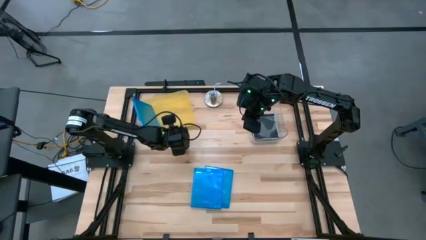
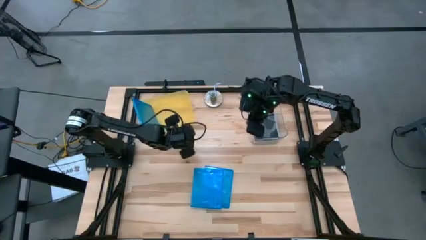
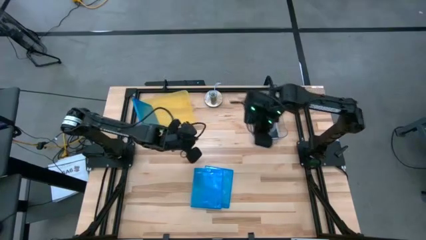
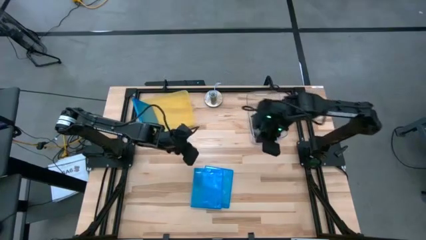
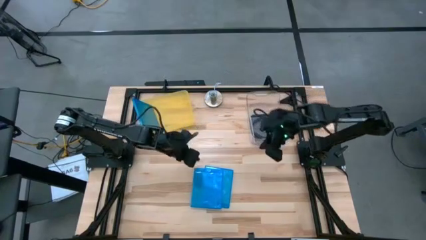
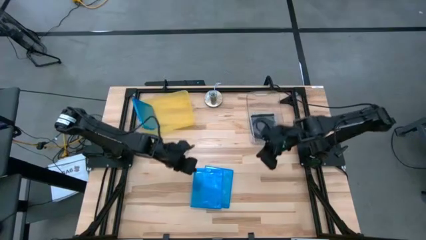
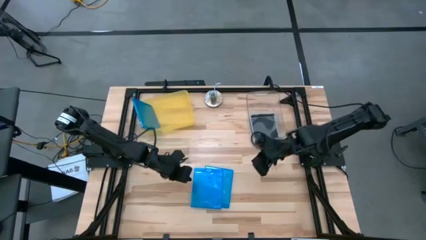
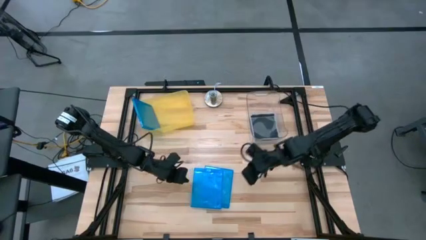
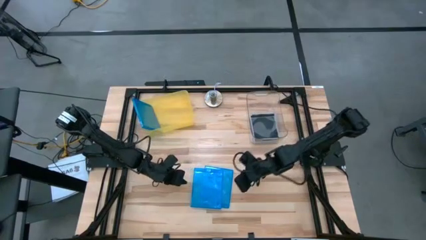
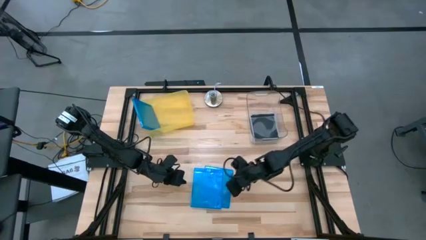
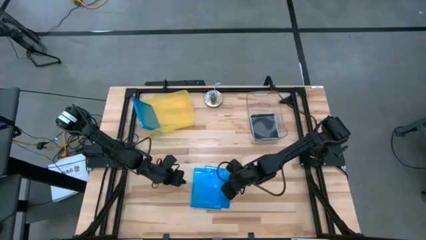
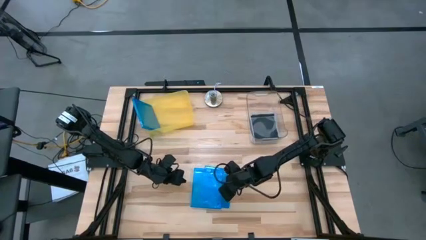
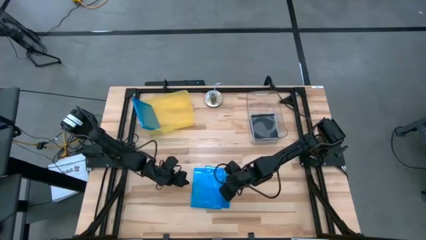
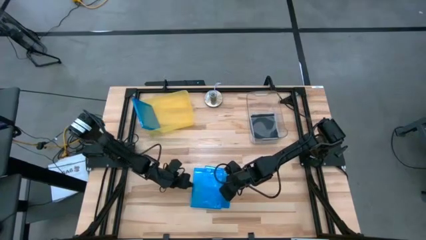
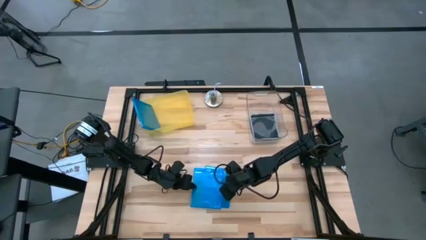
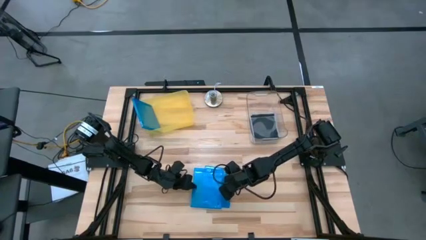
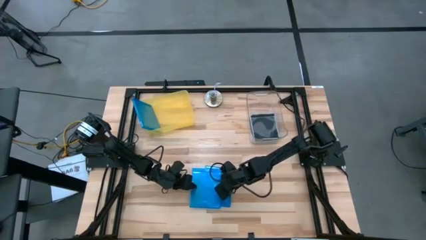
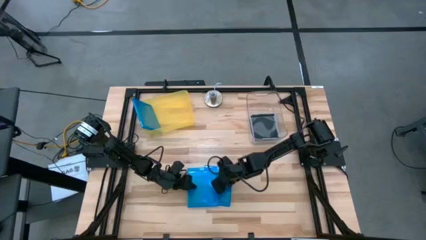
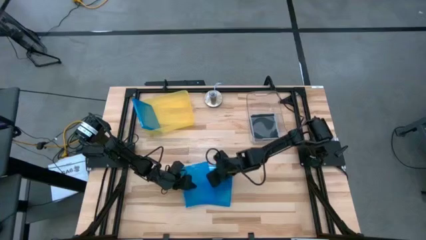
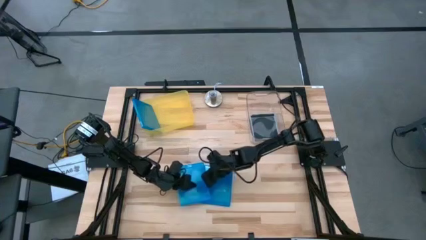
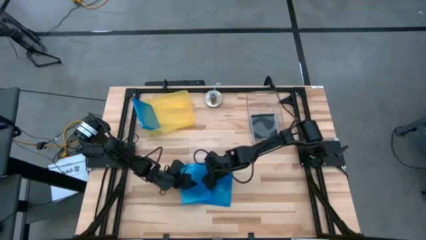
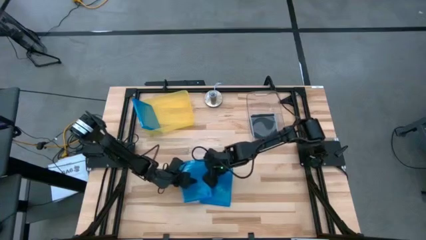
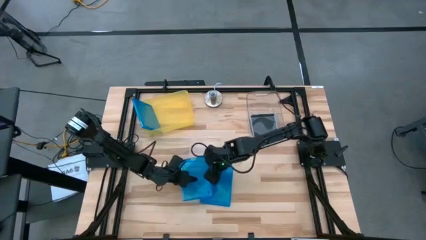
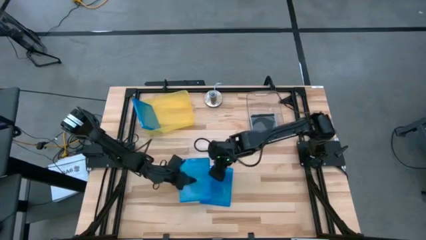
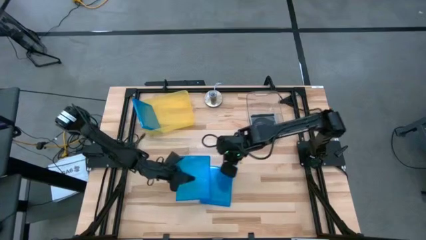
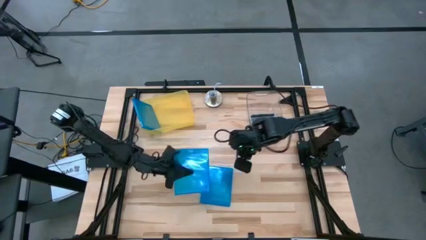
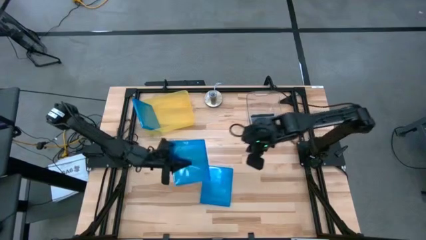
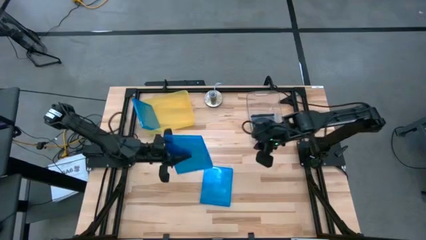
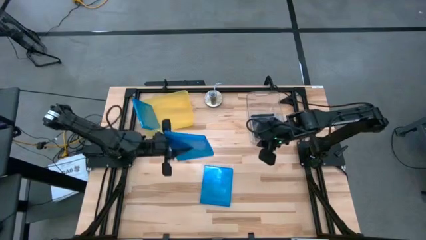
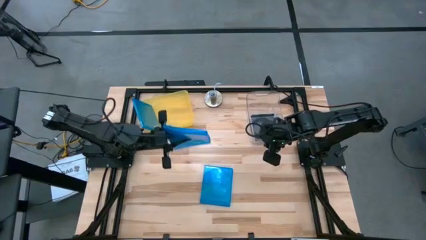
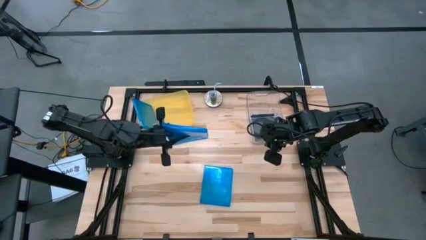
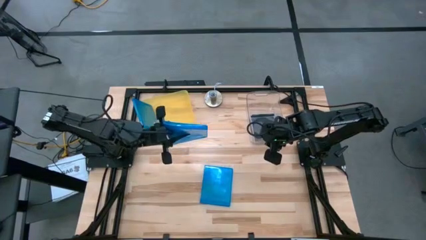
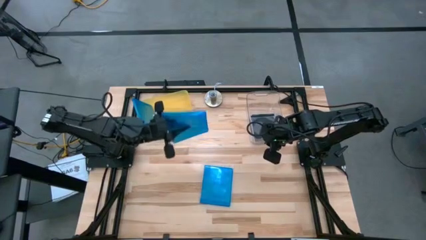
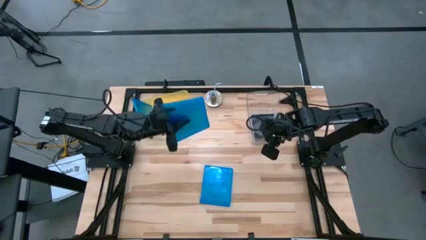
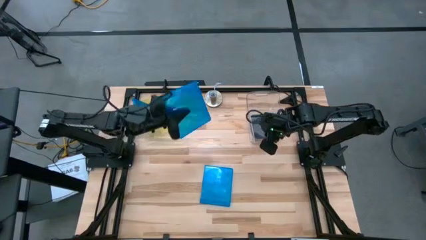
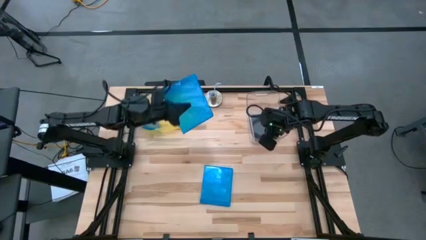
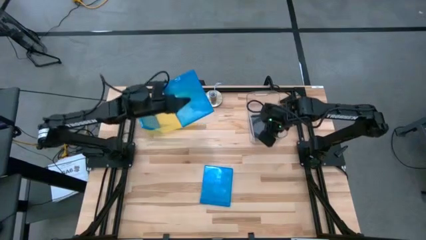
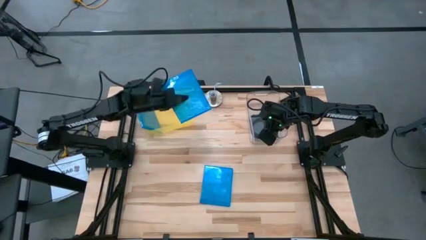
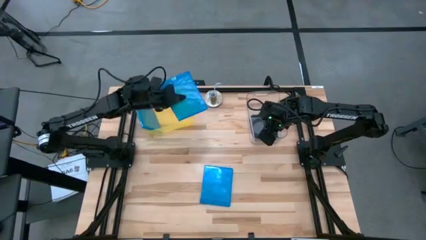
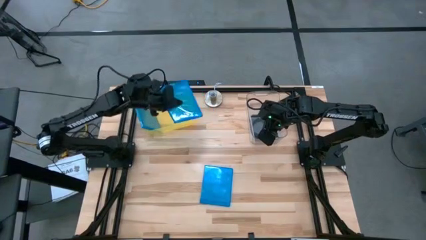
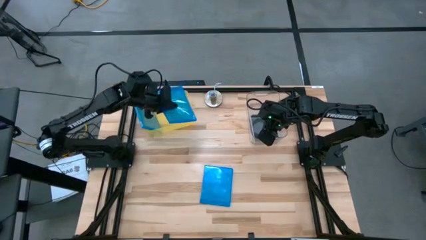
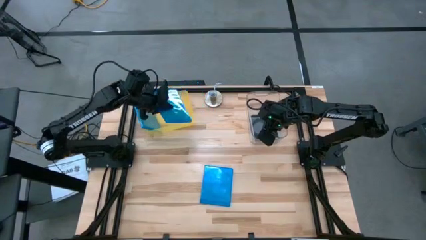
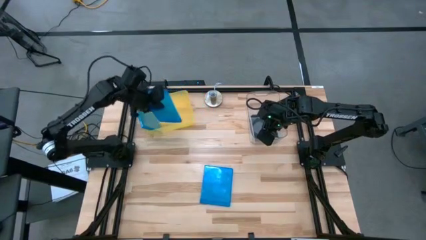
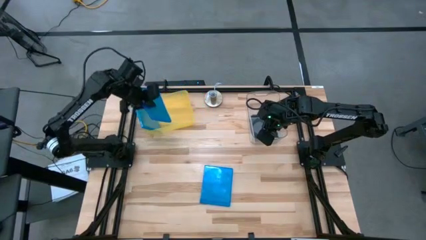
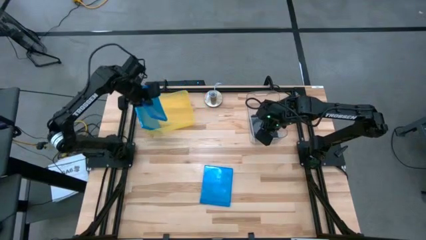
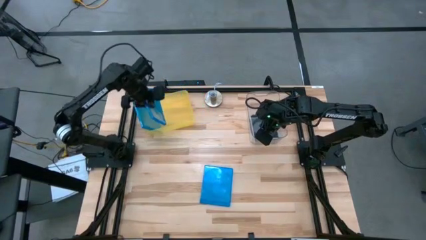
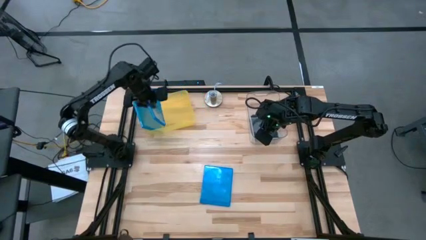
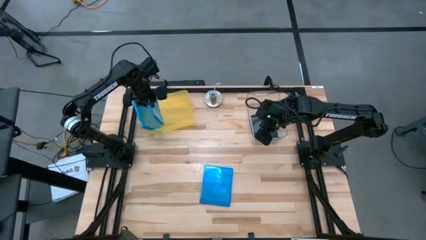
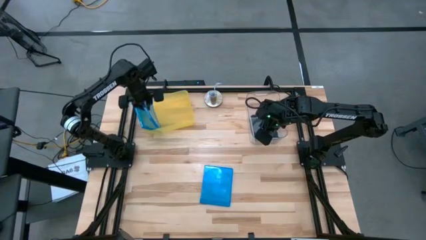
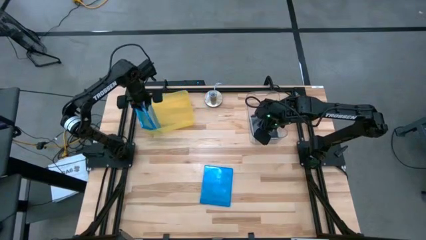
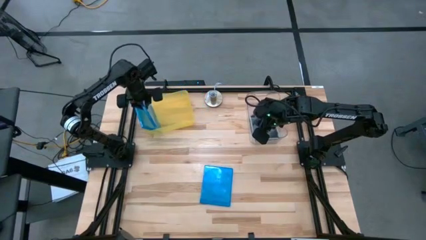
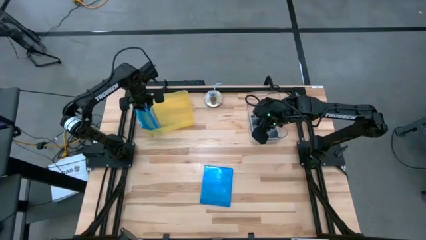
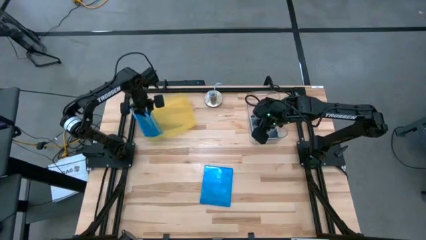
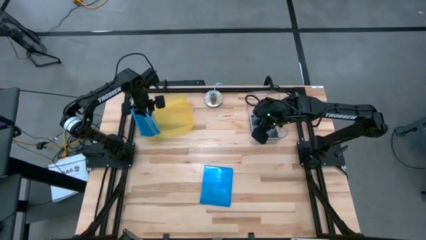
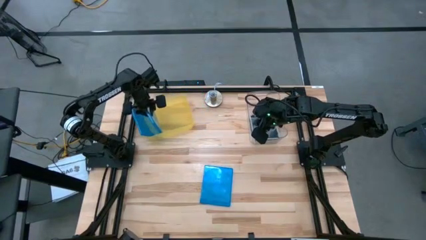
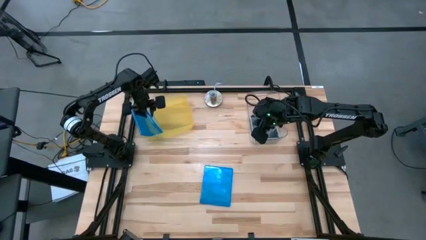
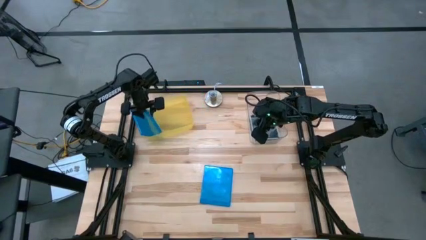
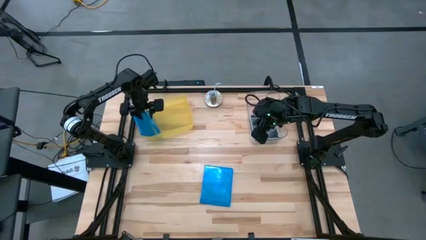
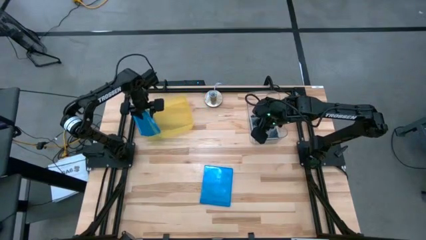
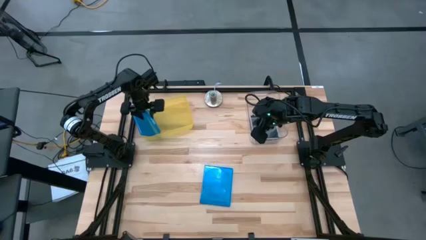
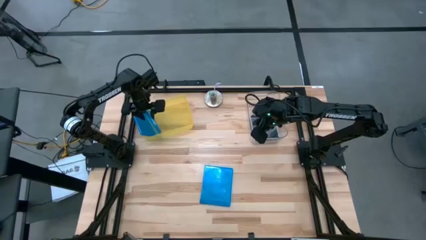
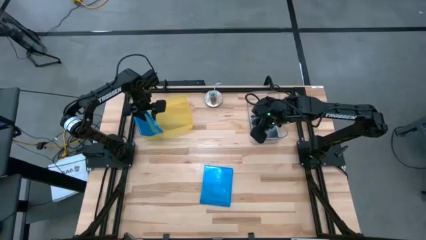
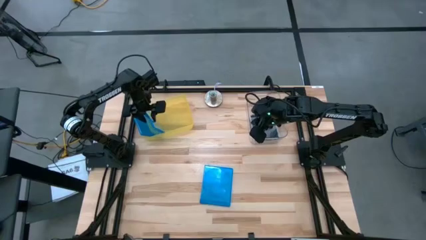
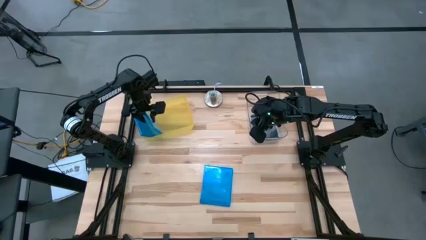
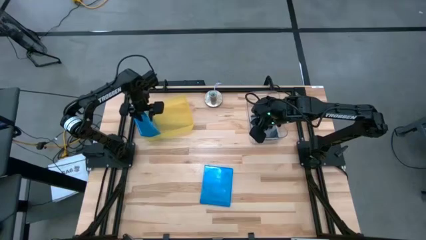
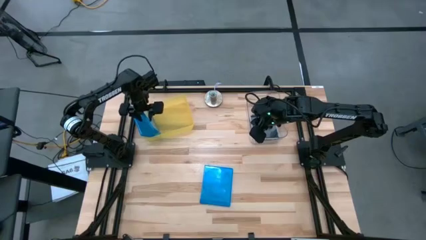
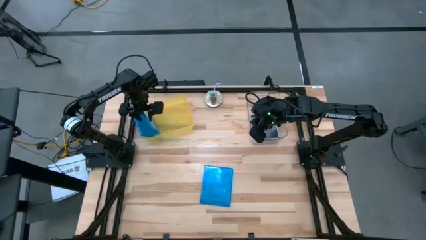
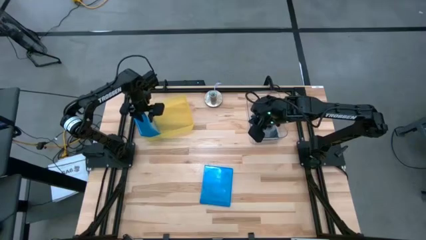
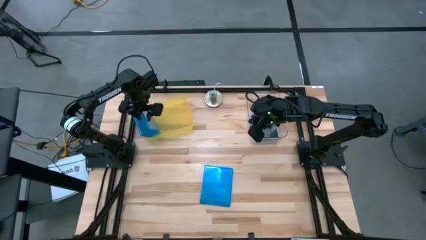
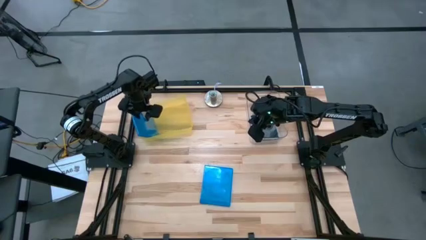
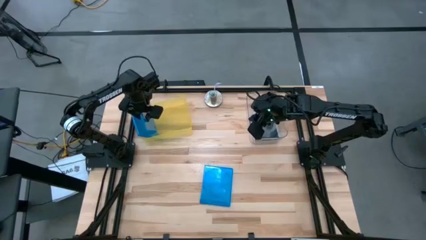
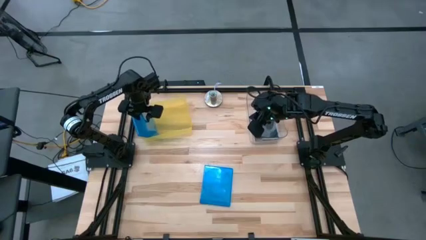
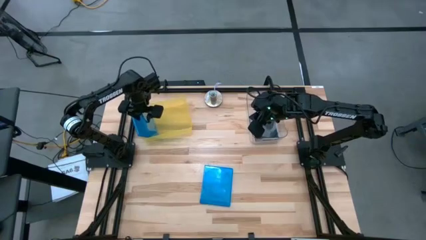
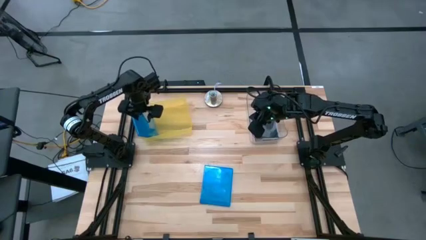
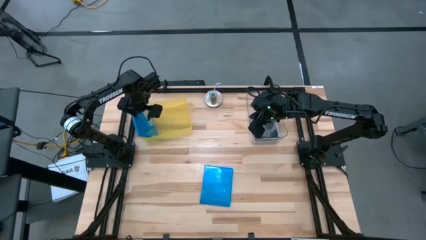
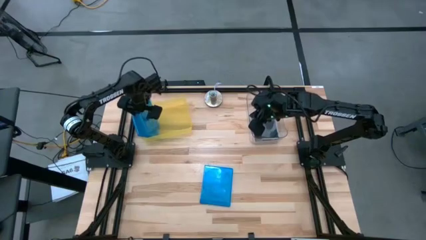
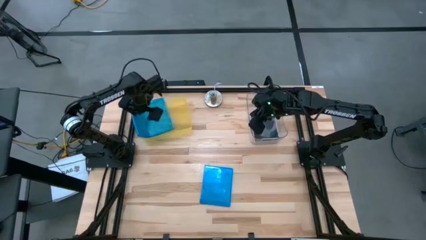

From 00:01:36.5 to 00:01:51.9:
Task: Pick & place jewel cases by type
Put the blue CD case into the yellow bin

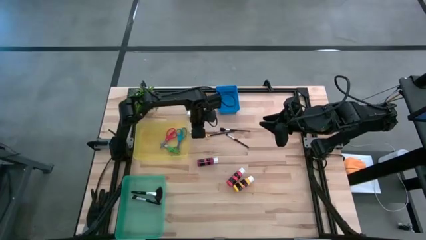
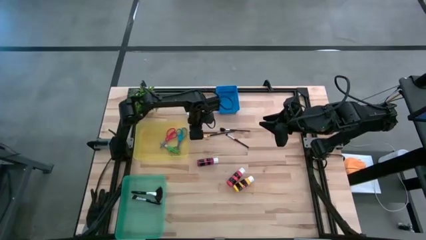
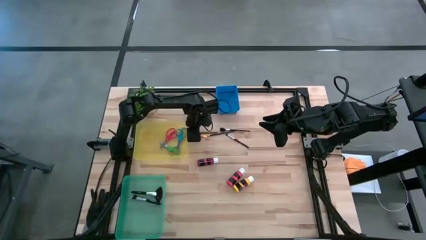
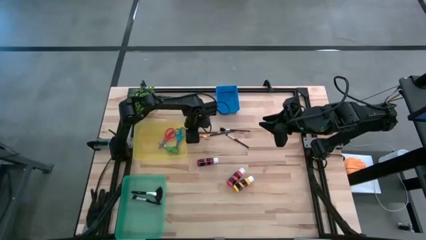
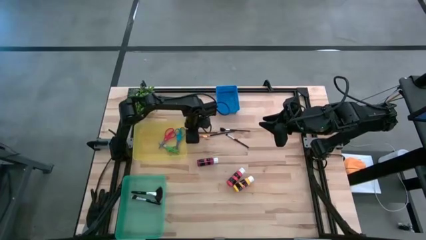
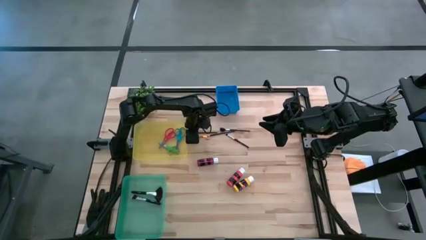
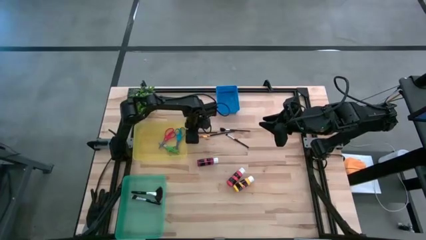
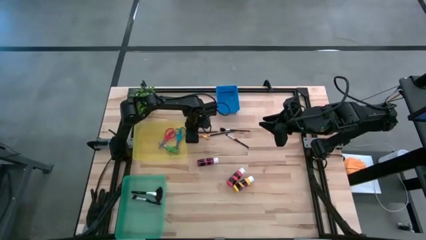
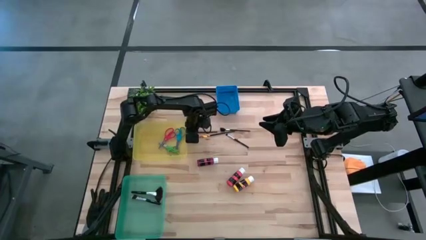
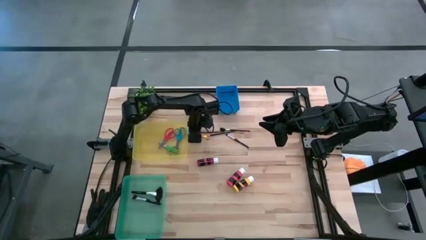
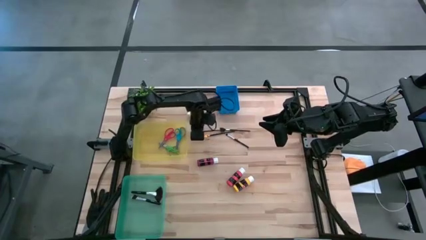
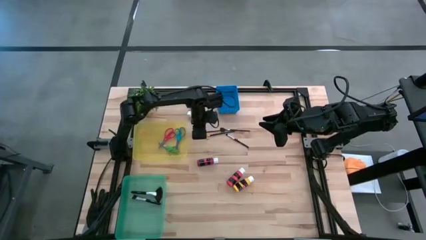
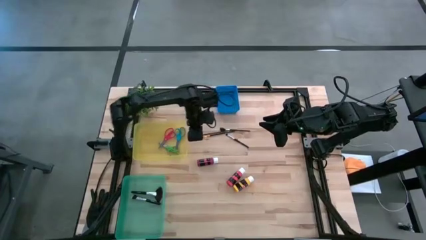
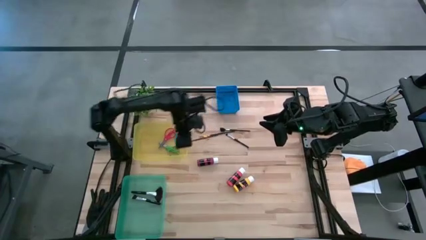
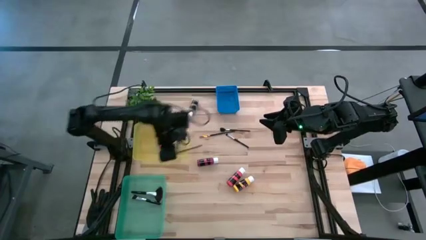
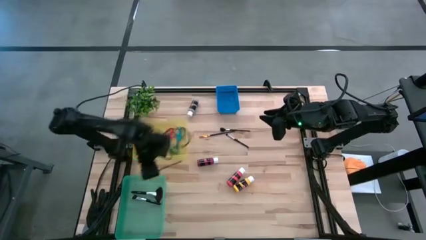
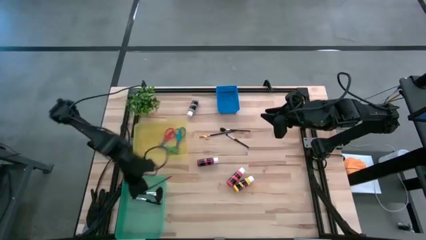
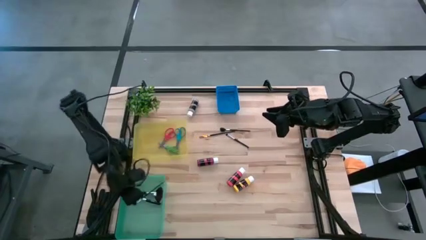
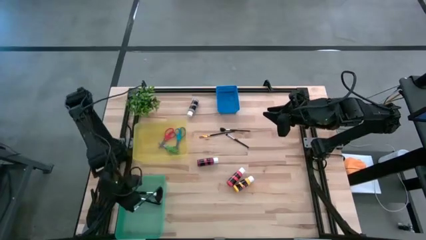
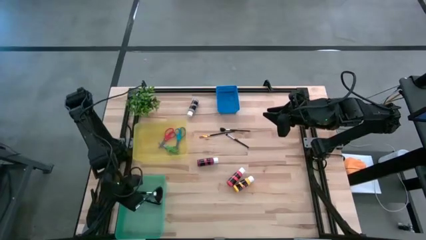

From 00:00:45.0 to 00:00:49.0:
Task: Pick & Place Paint Supplies
Put the eyeshadow brush into the blue bin
